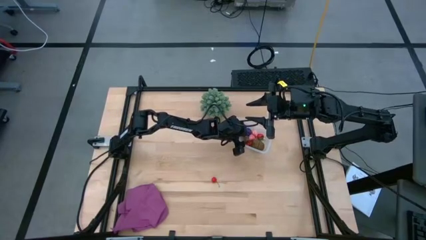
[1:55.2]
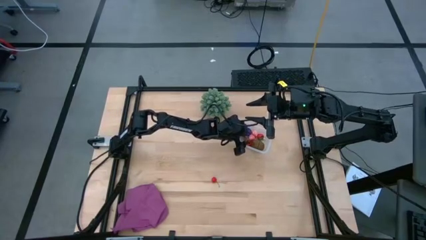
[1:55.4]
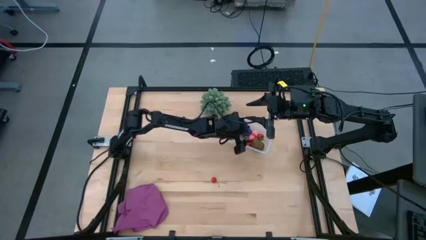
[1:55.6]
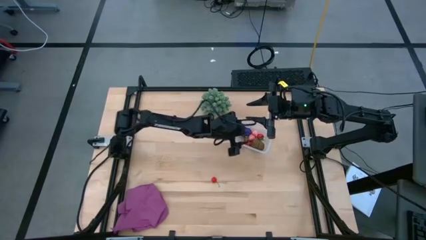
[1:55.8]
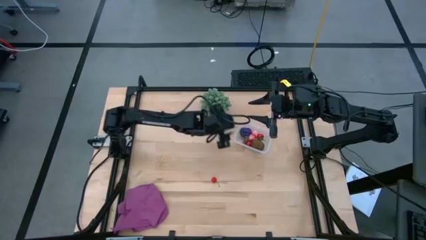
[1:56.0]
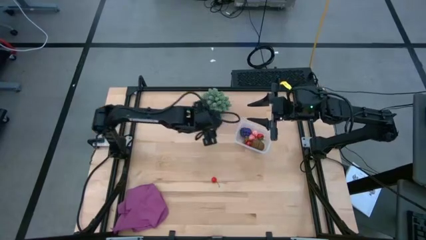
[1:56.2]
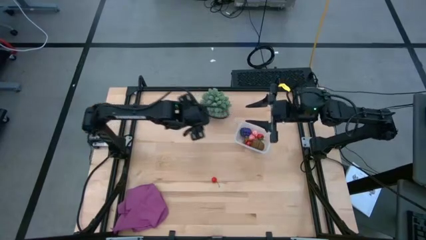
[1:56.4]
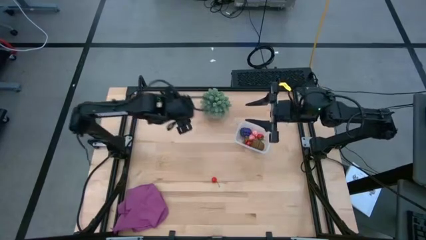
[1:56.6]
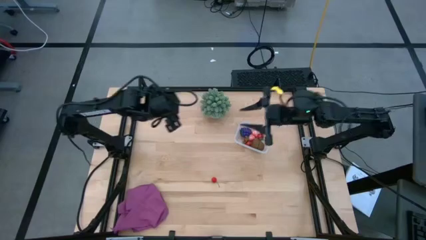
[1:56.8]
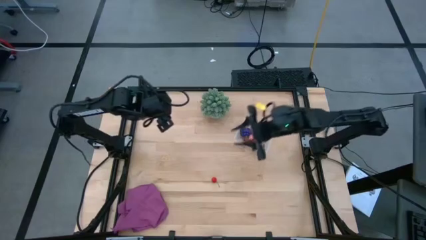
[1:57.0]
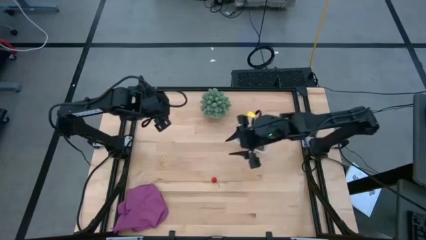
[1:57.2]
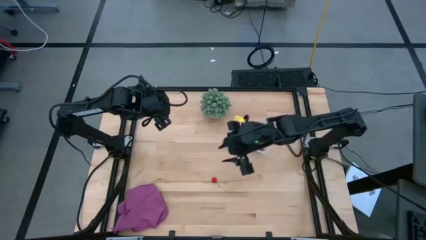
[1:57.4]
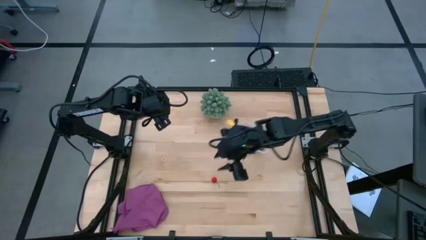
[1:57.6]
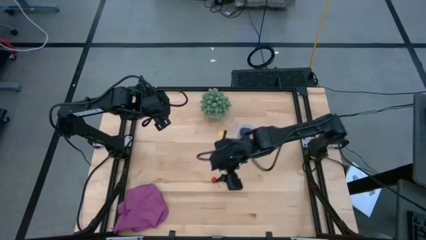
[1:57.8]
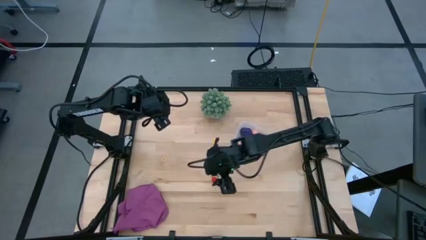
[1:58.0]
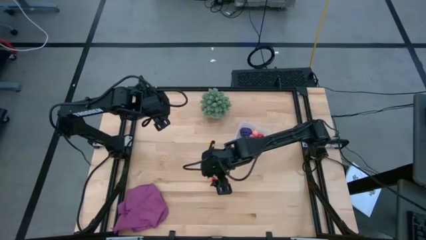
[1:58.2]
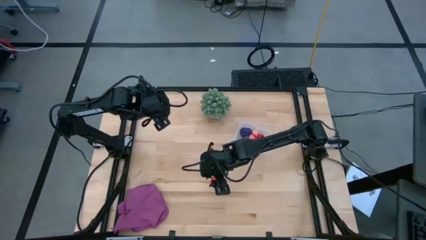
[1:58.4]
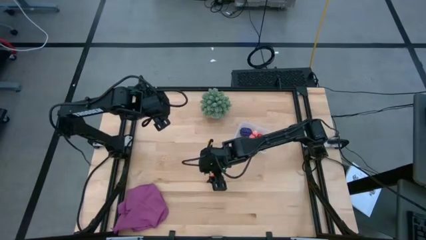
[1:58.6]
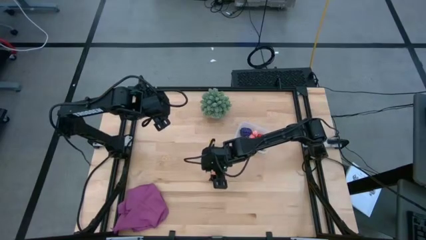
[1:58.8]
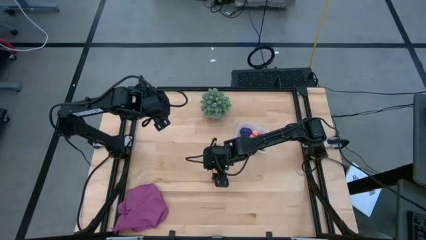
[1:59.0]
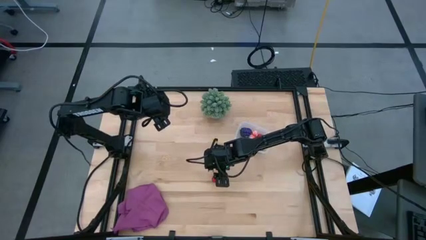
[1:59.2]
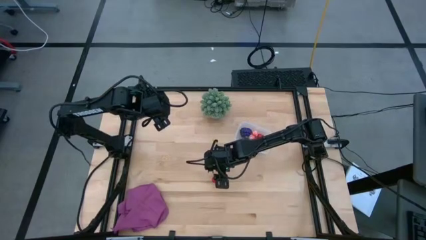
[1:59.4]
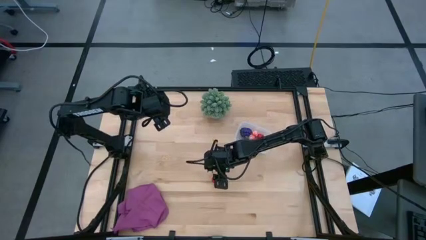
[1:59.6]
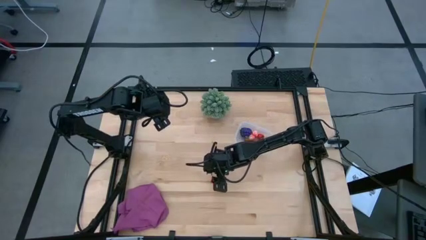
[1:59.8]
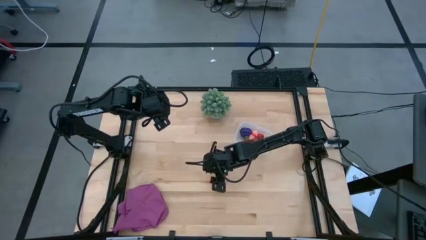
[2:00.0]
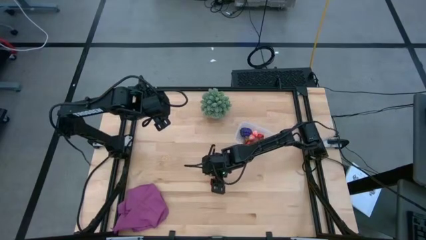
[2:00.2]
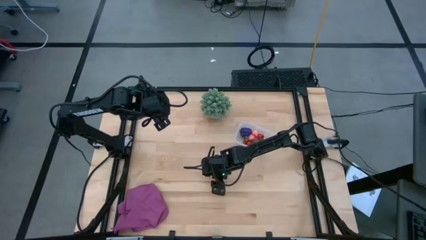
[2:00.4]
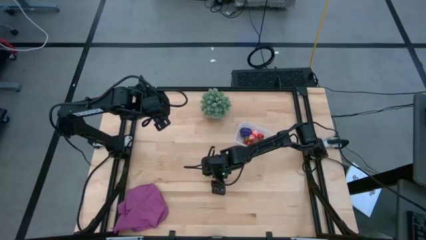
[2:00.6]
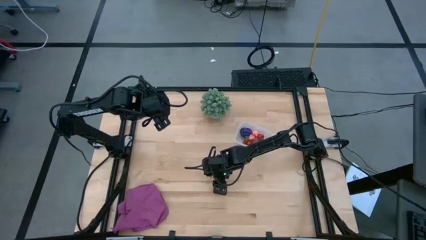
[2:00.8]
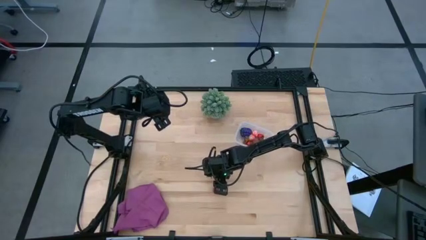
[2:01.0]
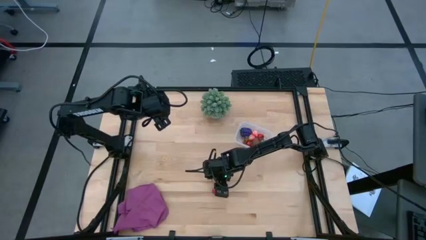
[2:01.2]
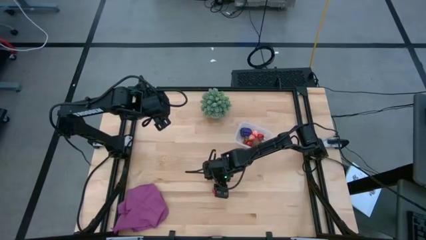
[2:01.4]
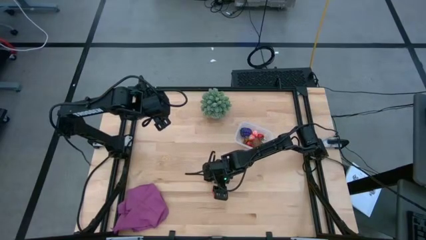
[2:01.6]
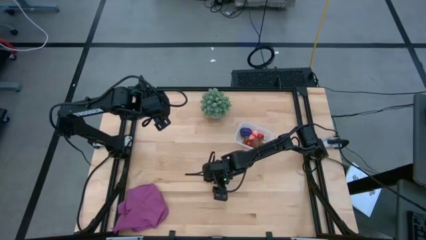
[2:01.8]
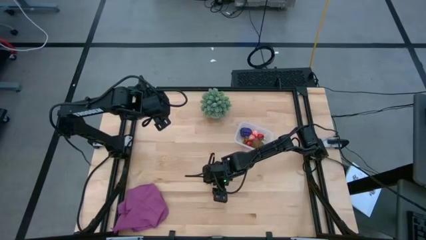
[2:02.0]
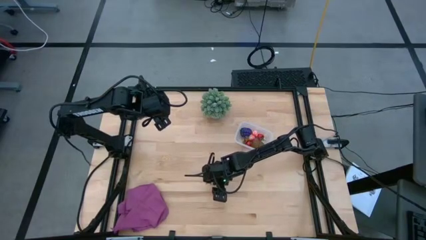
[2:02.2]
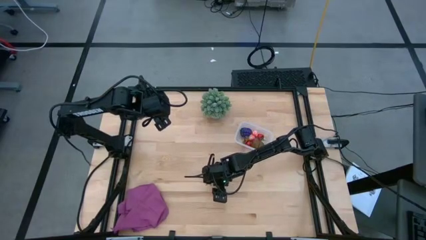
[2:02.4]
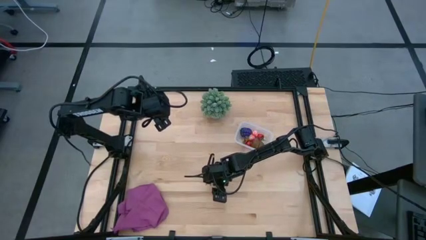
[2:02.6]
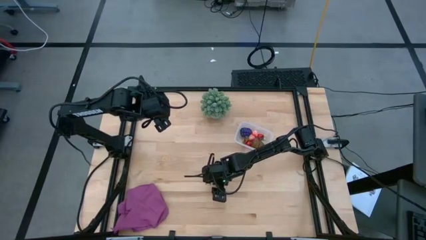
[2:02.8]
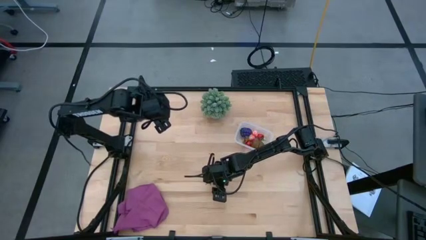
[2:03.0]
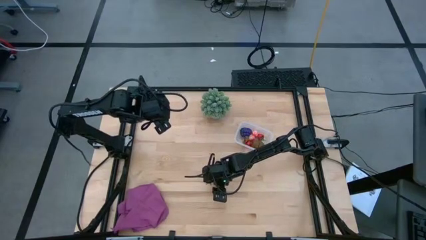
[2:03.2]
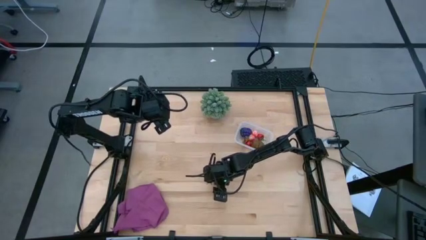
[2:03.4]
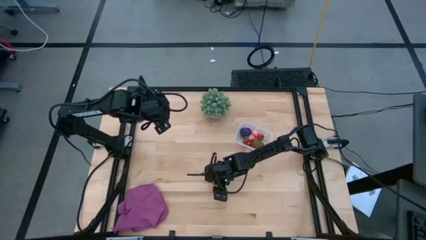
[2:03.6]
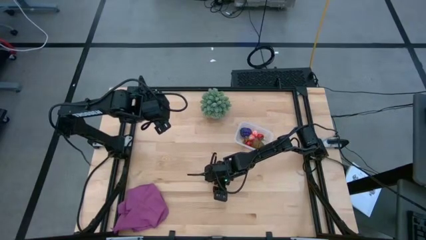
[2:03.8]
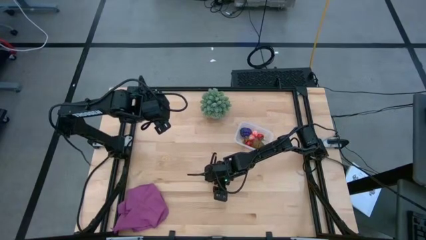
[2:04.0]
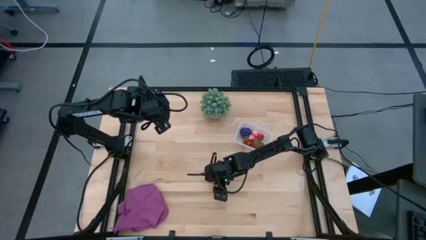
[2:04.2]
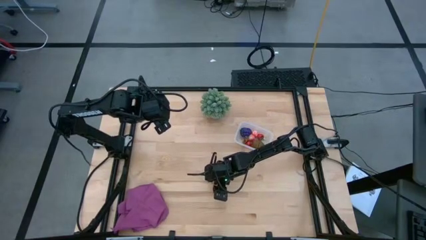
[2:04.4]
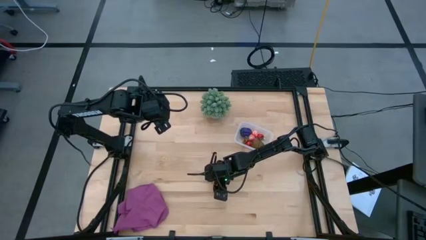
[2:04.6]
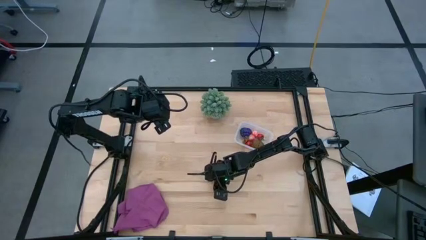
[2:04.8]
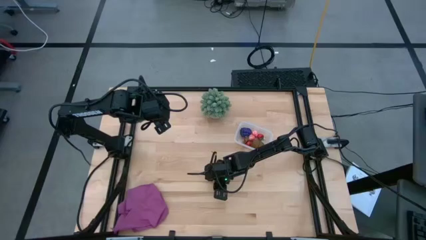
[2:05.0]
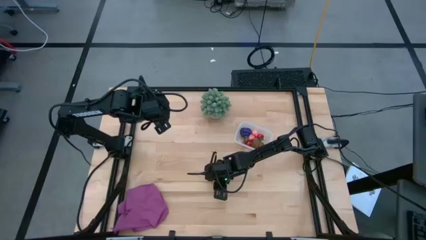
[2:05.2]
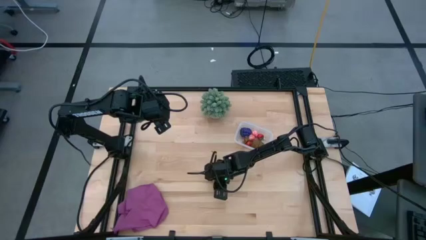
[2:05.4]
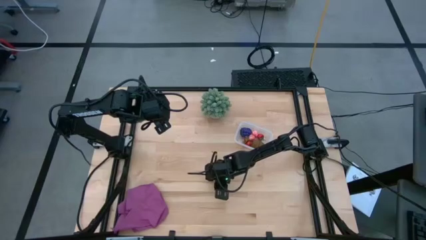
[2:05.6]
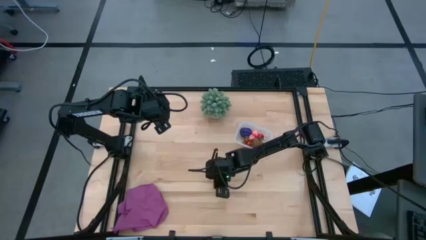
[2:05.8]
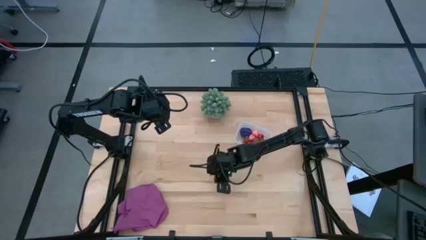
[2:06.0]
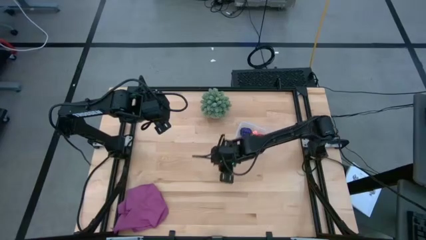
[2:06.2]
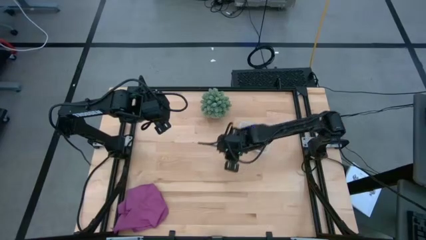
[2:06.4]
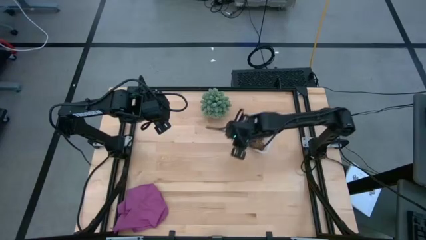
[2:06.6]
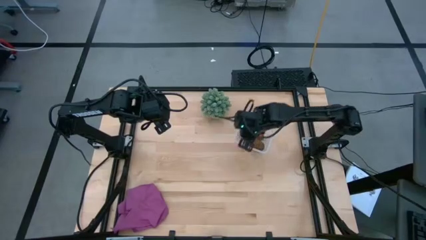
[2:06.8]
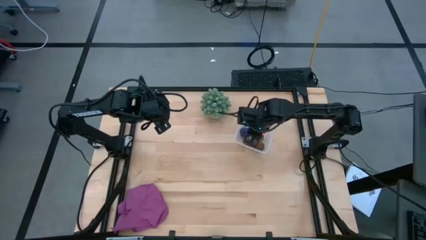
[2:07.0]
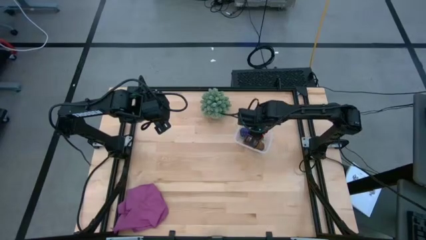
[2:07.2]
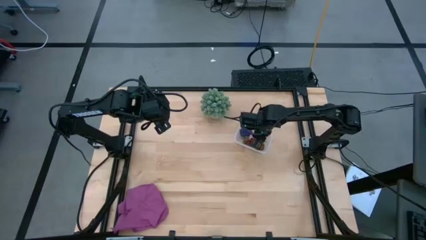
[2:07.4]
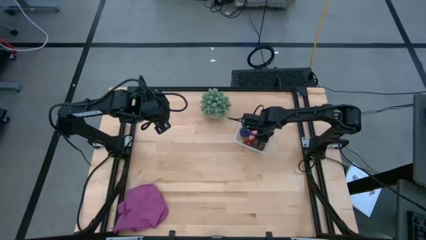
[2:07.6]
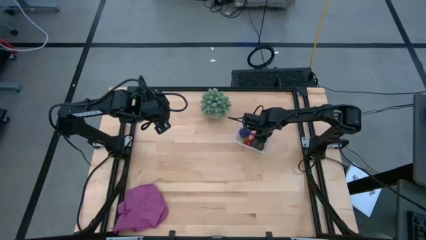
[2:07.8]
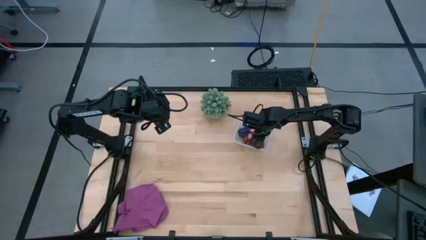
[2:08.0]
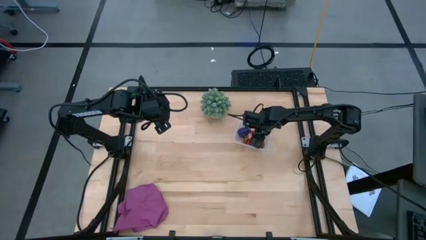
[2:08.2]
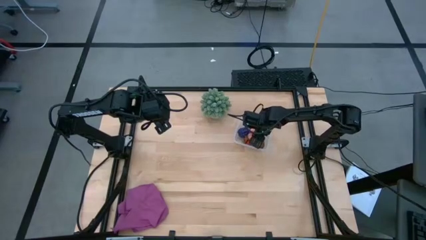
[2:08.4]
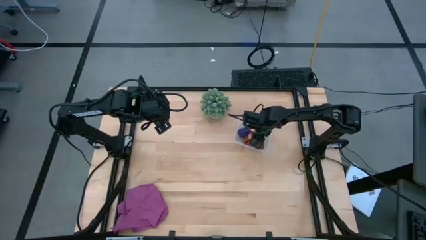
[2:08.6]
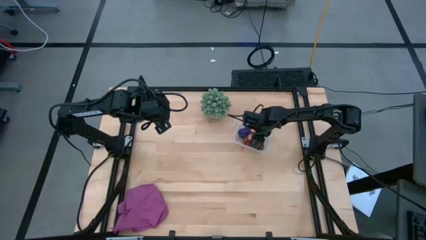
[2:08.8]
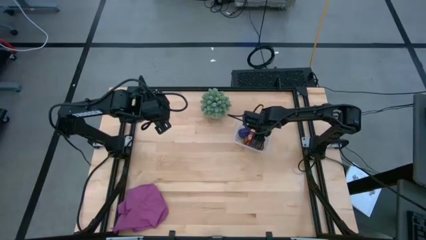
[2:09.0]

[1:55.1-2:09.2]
Task: Pick and placing Produce into tupperware
Put the red cherry into the transparent bin

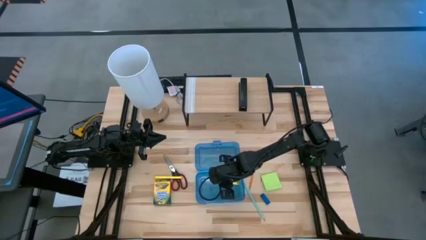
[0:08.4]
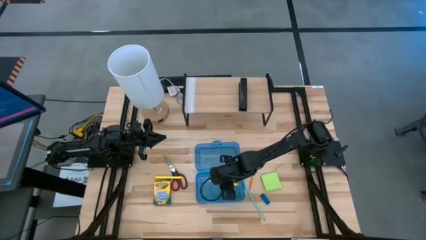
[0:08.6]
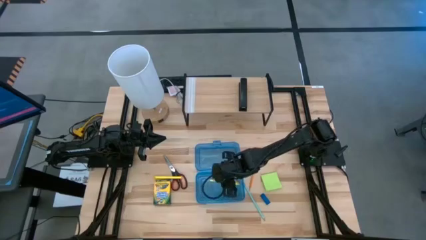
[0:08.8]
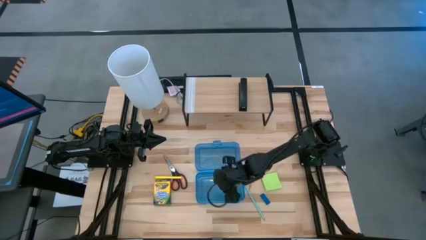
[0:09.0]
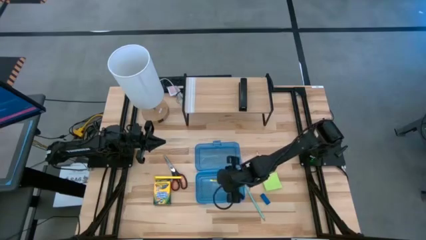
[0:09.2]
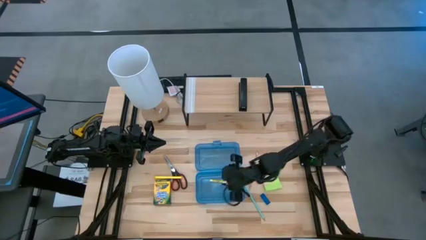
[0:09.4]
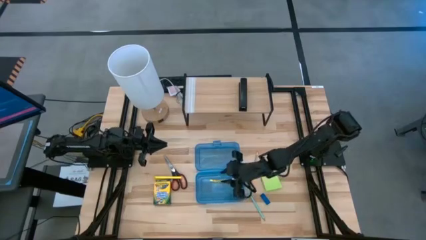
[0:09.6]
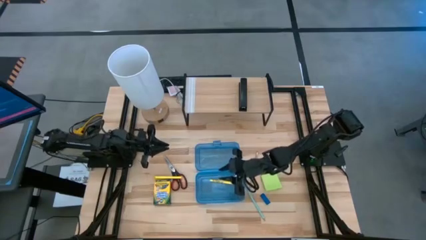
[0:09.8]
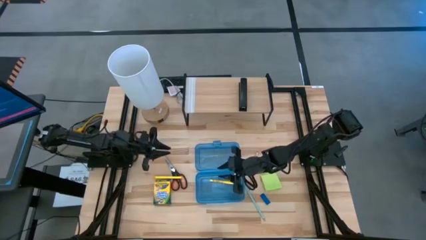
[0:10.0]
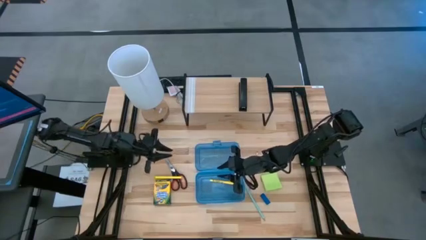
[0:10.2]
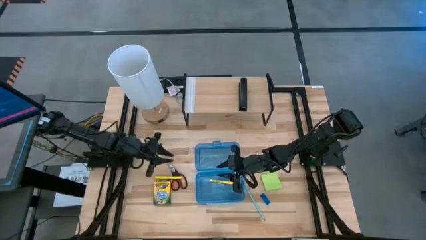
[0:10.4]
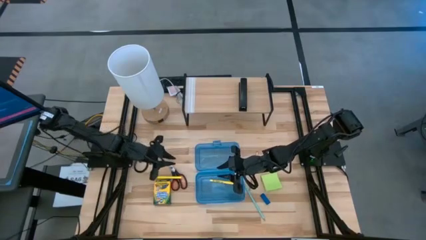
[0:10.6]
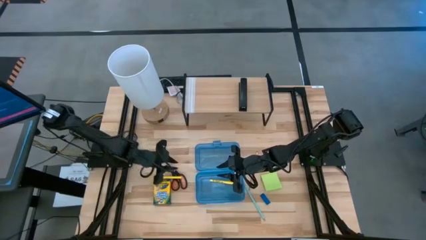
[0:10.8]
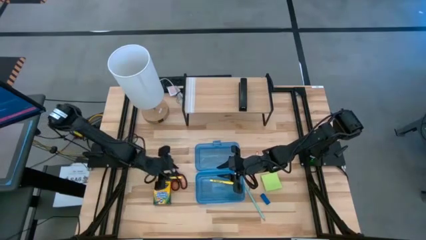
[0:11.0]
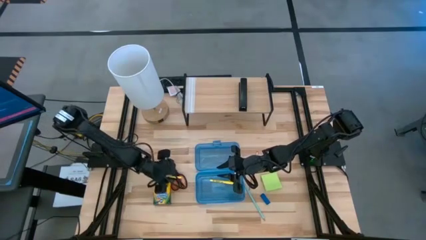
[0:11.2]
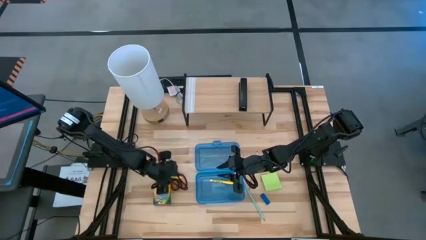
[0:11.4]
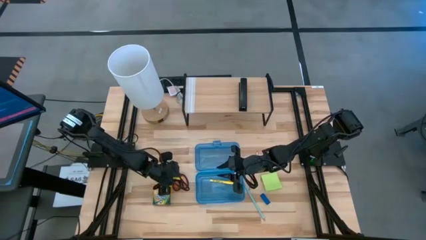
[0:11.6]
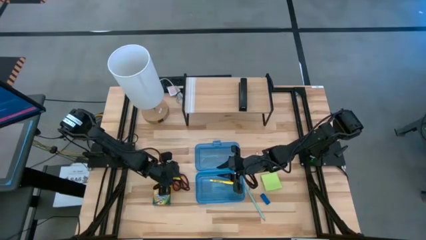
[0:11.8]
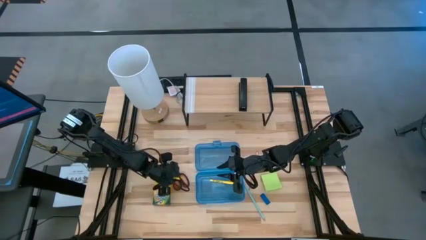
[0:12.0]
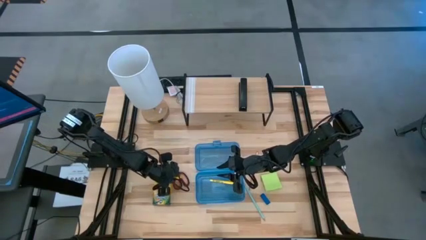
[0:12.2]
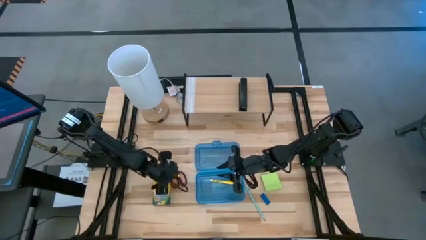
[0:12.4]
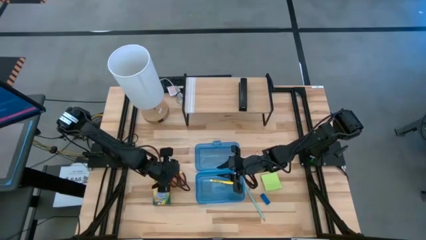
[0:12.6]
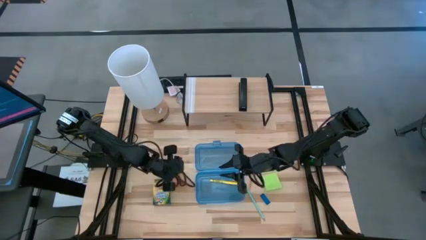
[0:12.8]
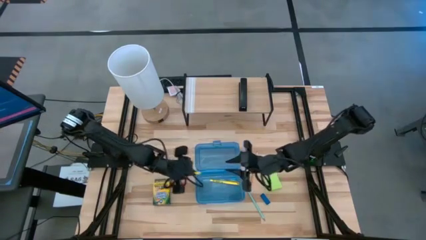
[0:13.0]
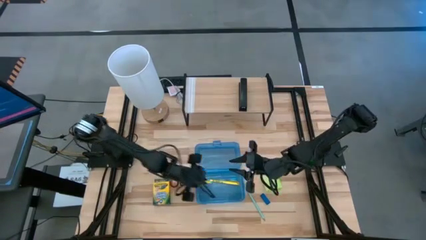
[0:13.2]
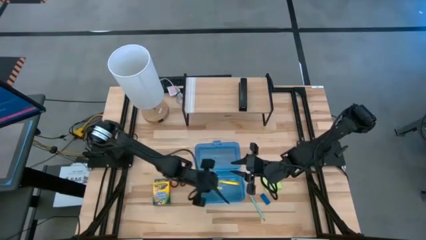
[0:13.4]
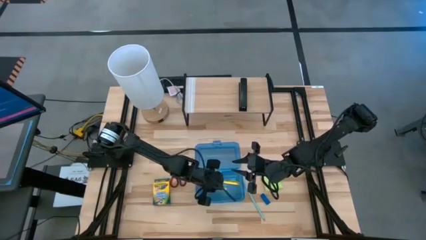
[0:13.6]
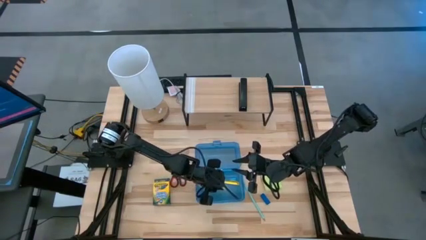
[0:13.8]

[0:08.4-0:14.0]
Task: Pack school essentials
Put the yellow pen into the blue supply box
